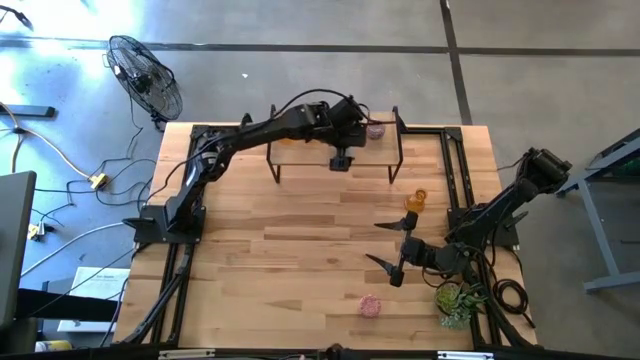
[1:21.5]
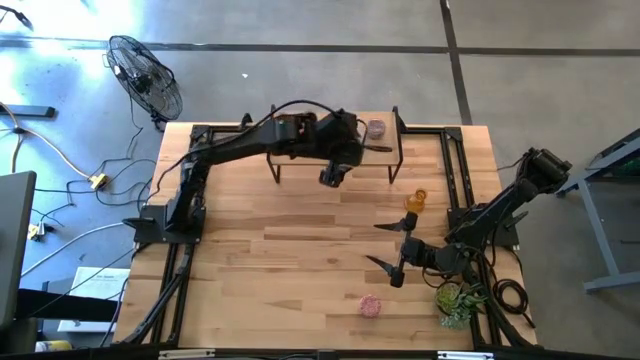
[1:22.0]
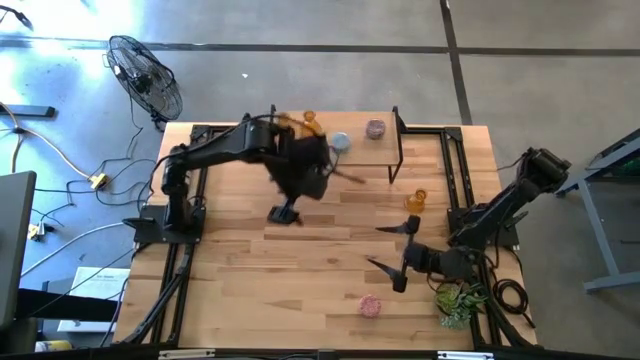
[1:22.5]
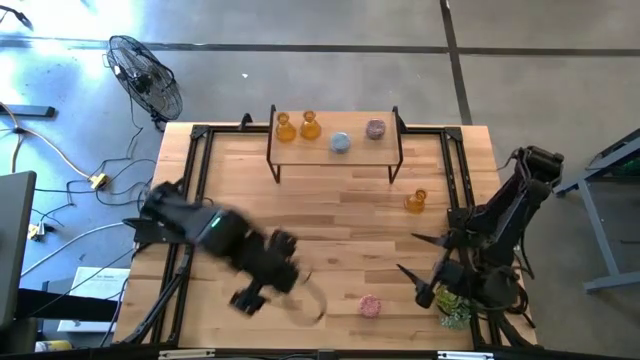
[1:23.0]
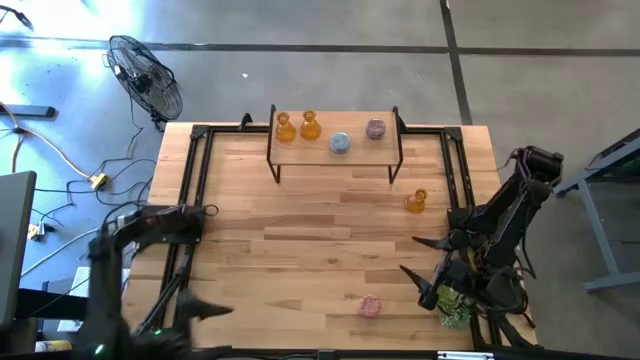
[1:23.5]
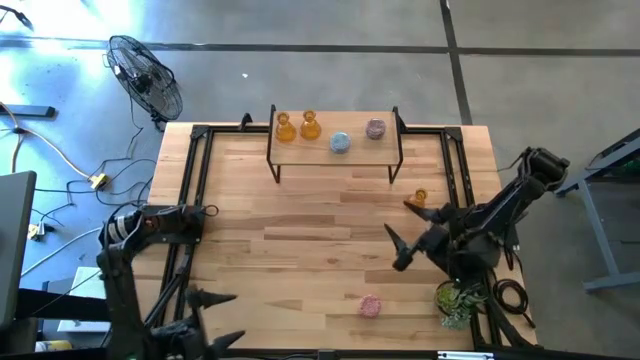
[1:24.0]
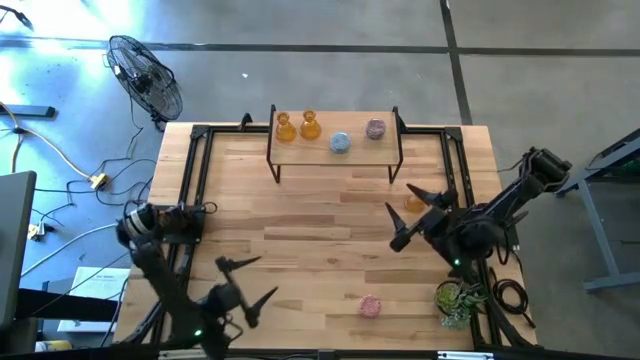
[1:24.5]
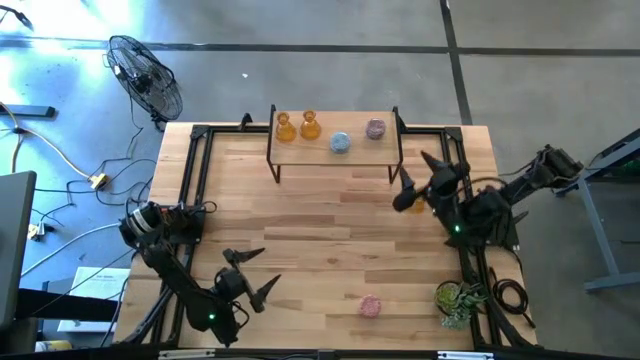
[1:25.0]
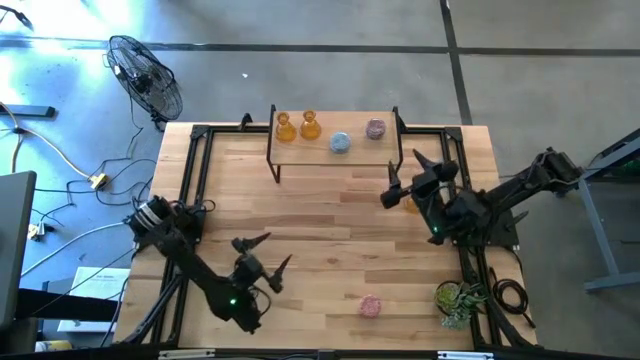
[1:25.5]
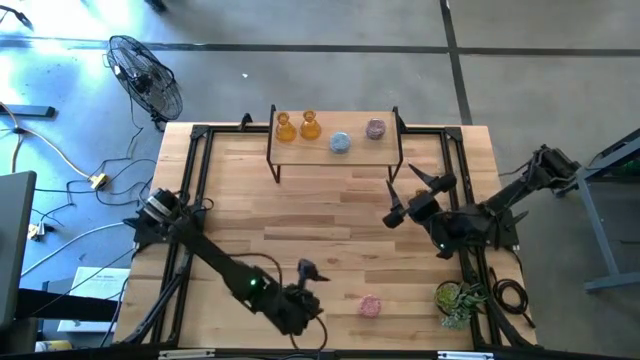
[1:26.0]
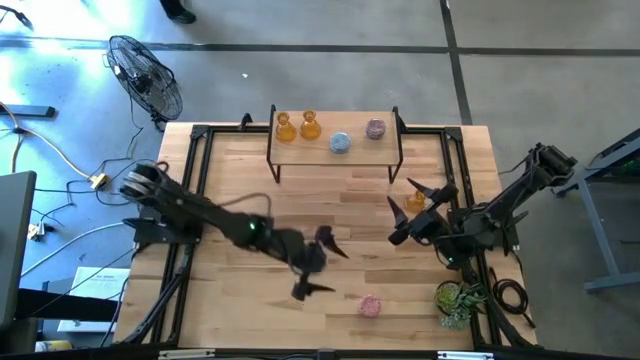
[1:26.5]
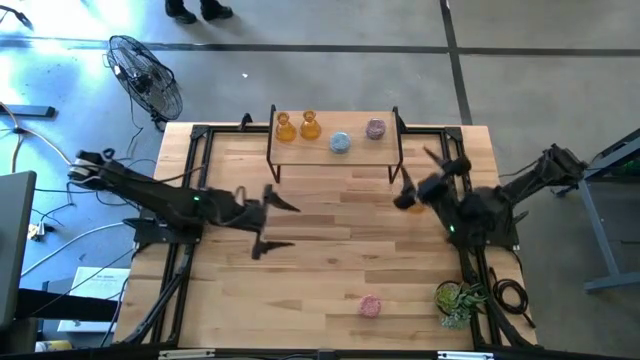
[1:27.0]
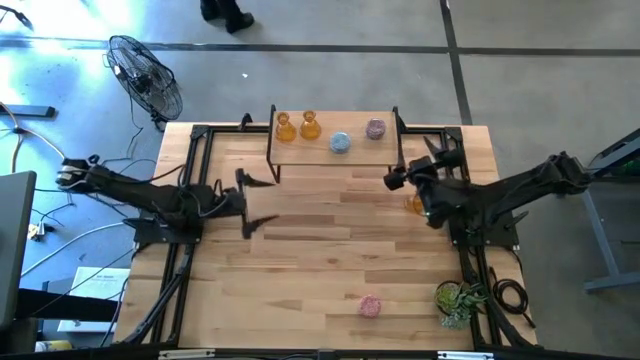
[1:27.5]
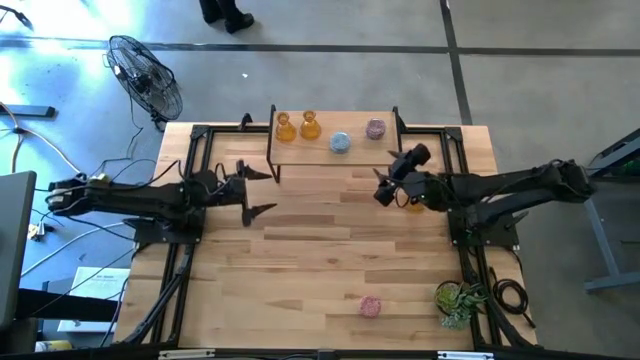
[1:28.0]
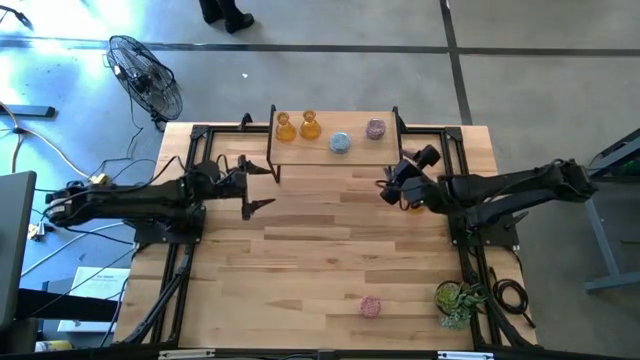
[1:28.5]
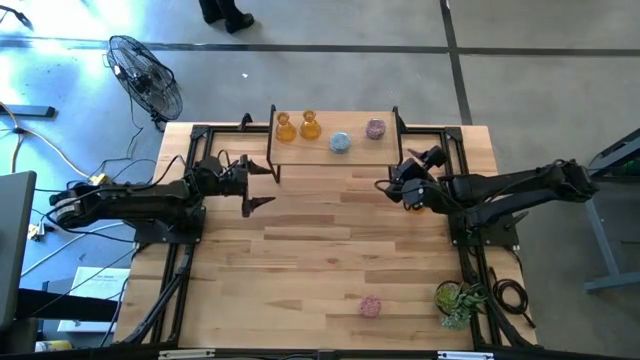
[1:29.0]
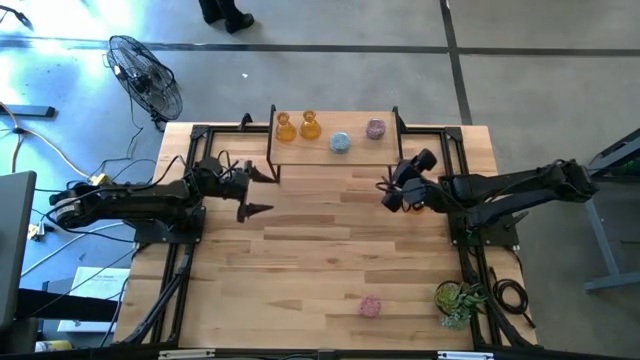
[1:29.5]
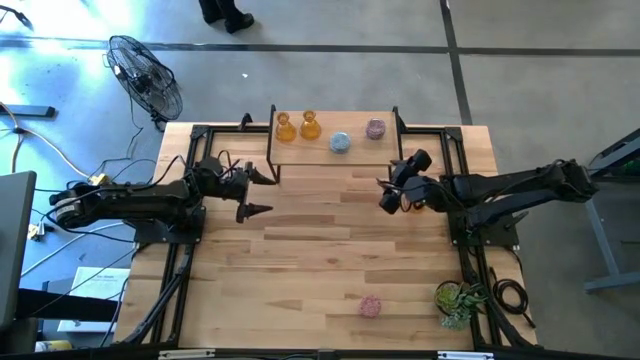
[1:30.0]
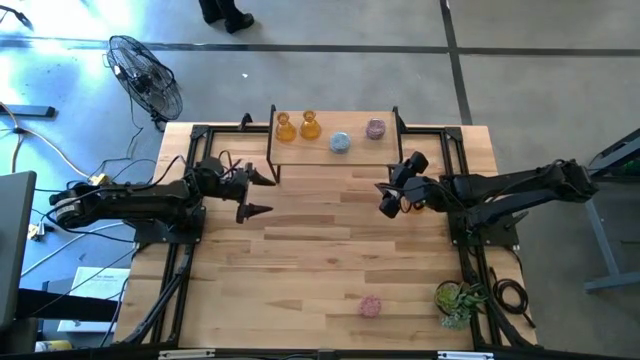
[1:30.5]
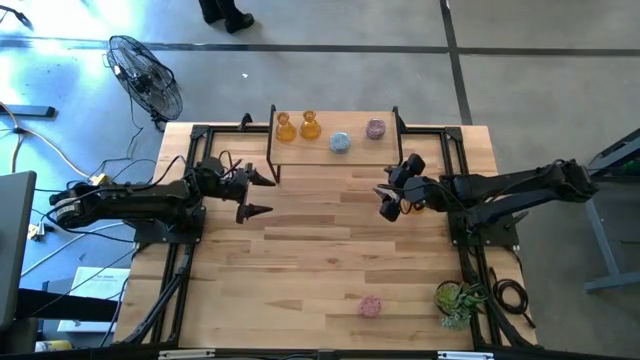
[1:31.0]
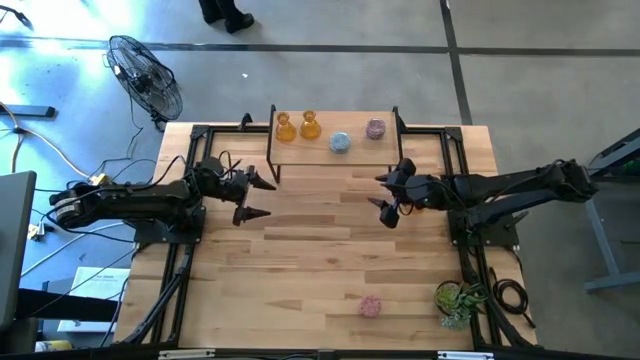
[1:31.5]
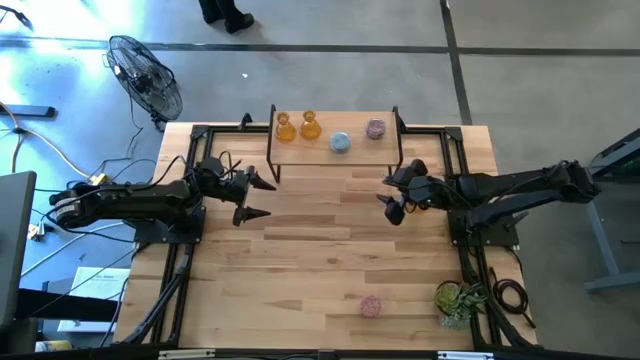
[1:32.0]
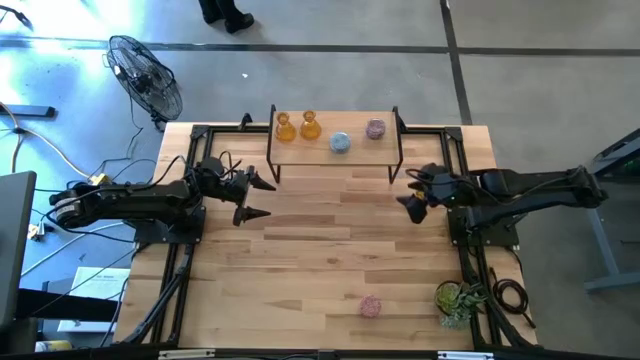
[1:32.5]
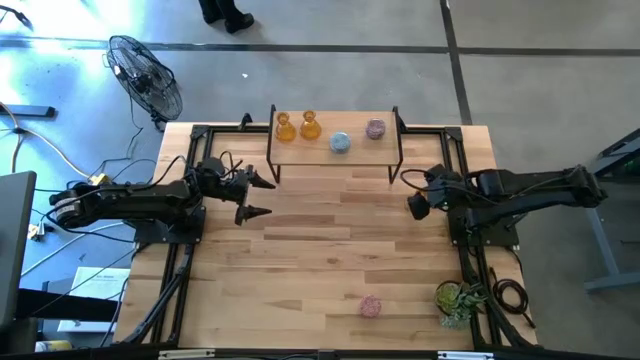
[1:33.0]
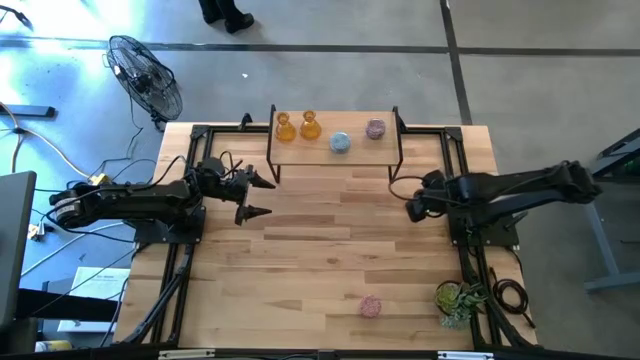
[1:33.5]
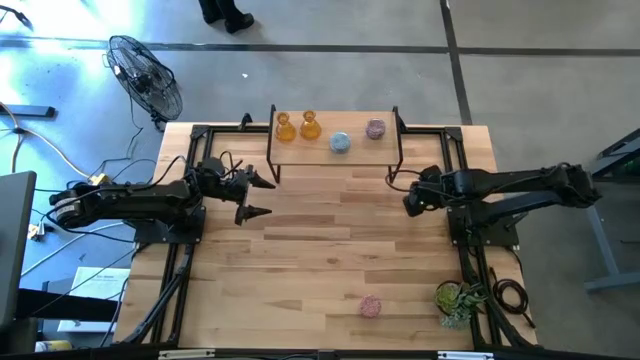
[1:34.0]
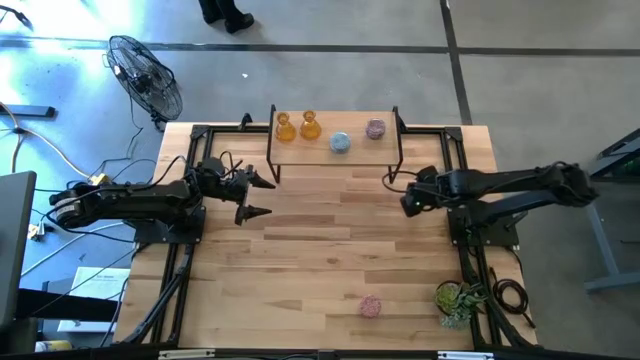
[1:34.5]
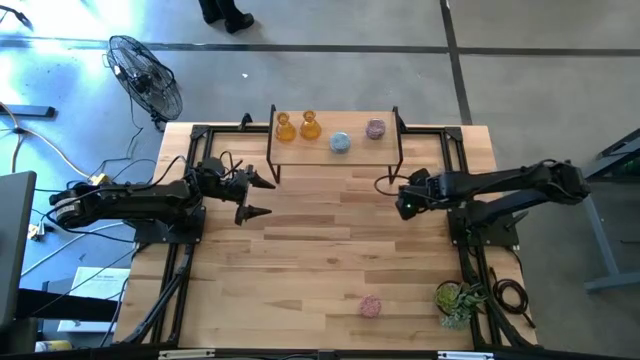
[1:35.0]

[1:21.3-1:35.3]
Task: Pick & Place candle stick holders
Put the orange candle holder on the shelf

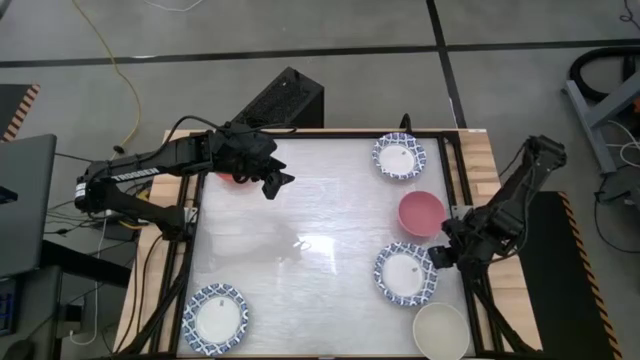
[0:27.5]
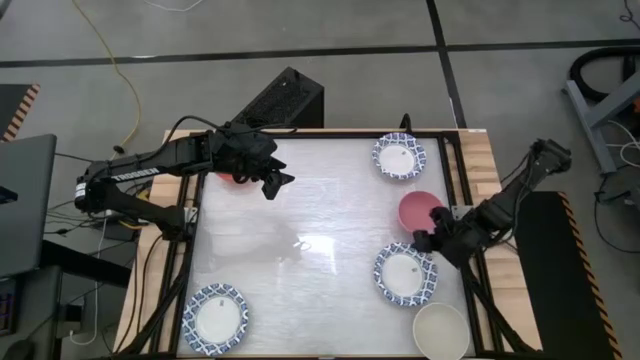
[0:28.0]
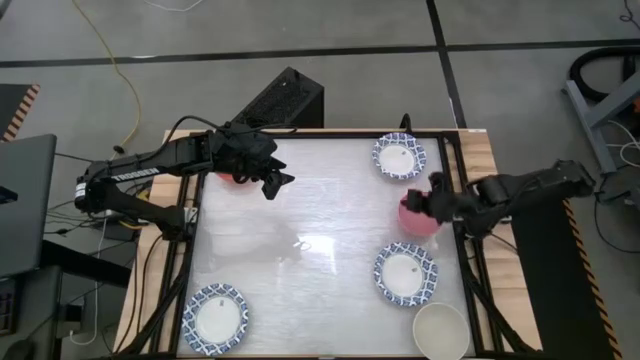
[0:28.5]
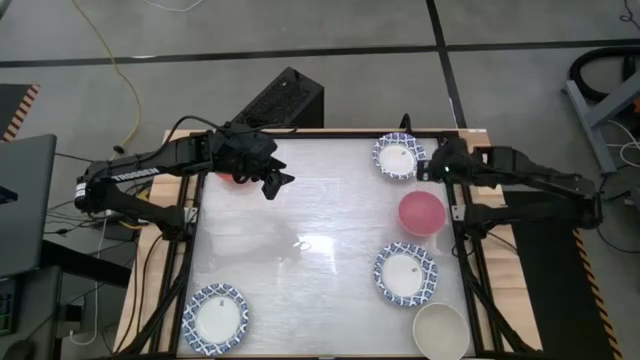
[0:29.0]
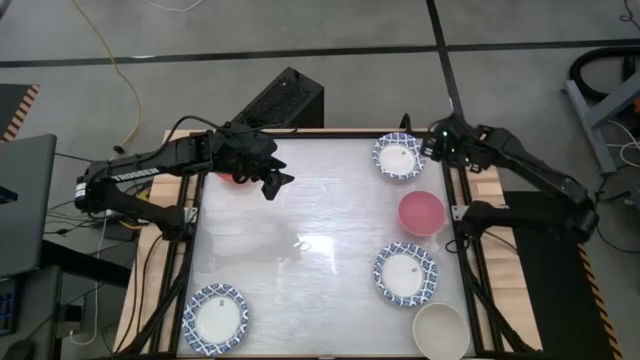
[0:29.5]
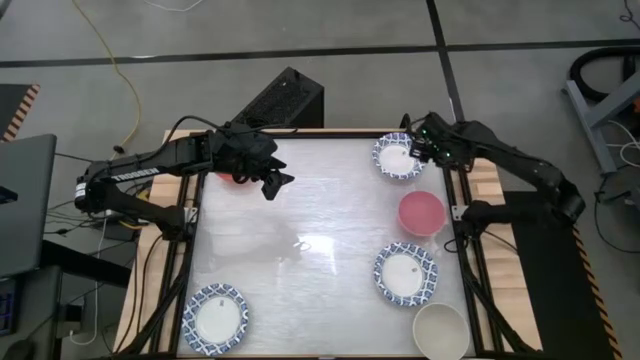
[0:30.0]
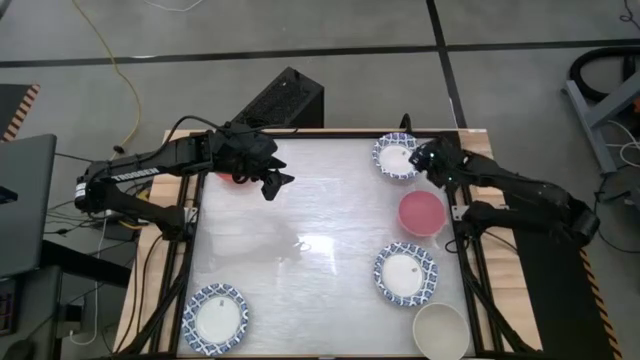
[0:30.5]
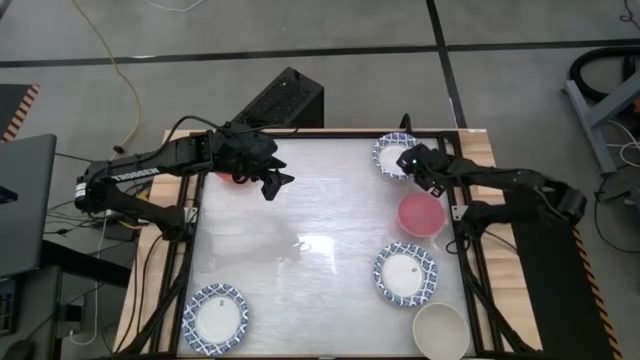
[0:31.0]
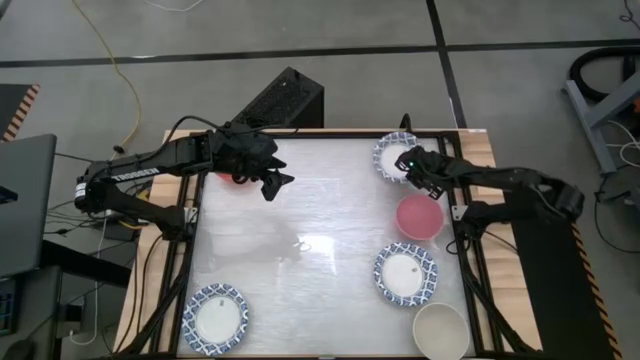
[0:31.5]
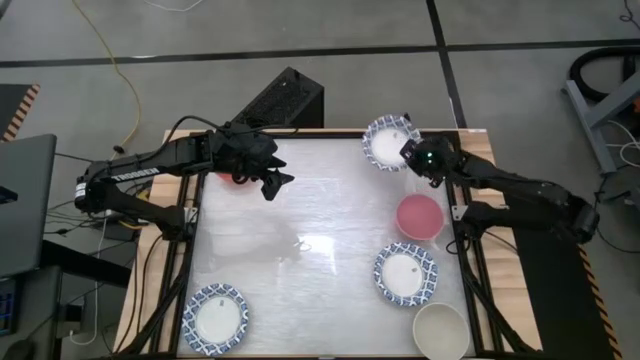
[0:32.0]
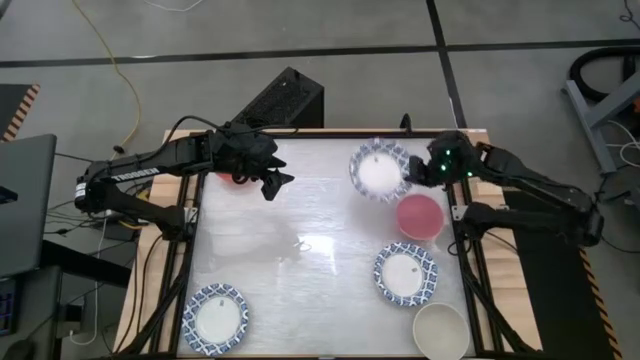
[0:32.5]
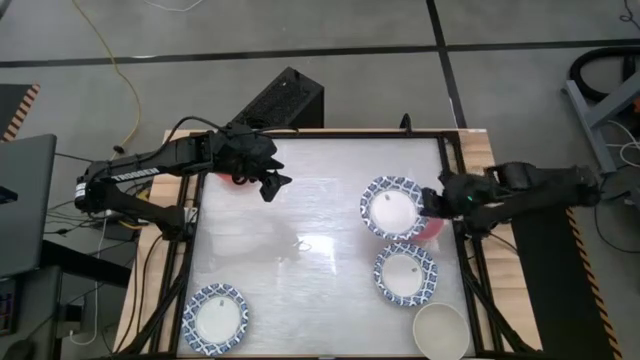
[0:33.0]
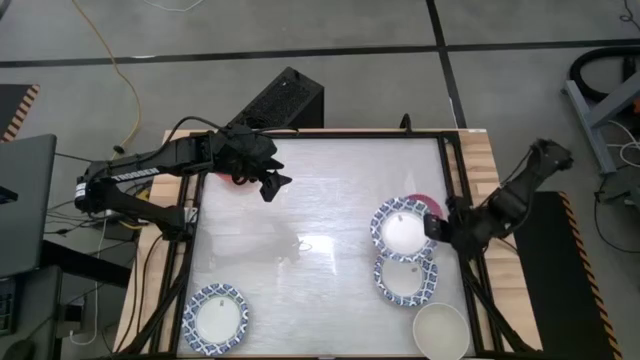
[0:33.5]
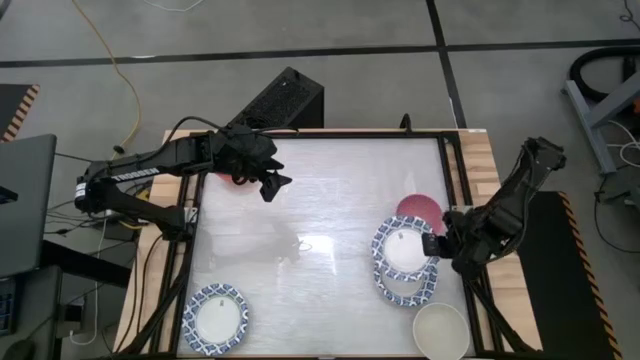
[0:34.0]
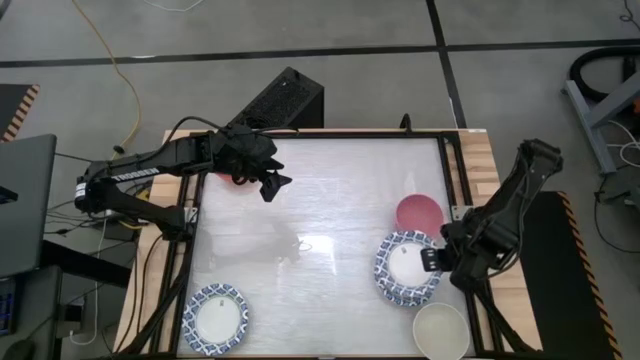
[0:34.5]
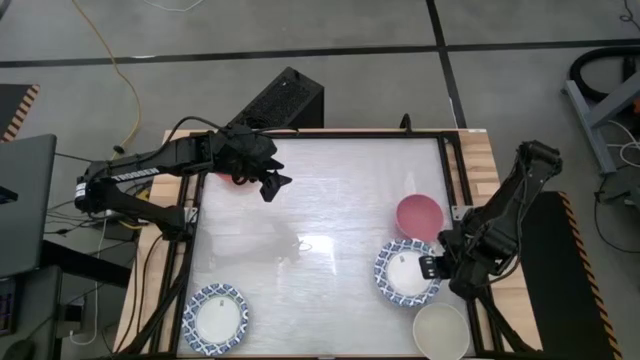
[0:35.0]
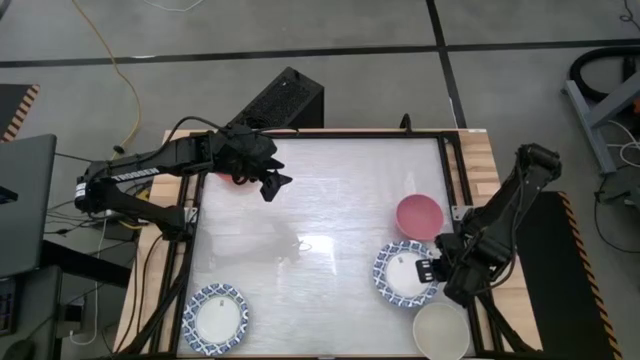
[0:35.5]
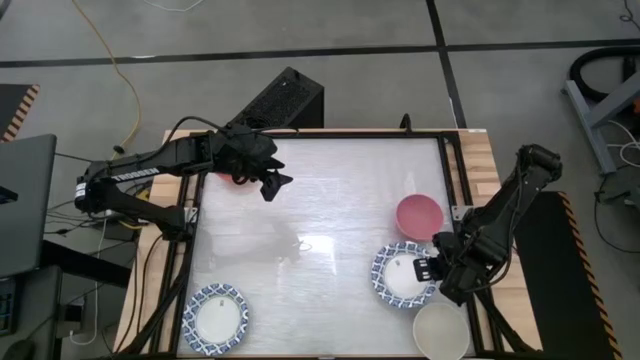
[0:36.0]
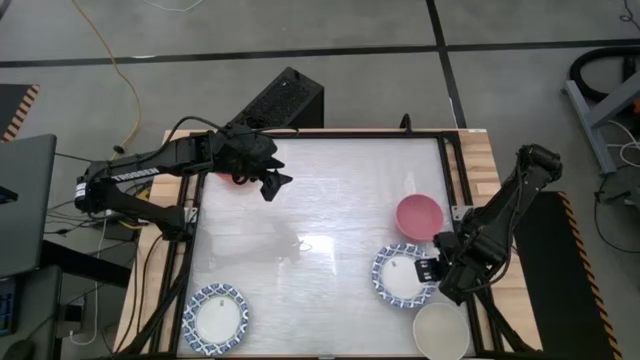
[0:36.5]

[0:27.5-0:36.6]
Task: Nest bowls inside each other by size order
Stack the top right blue bowl on top of the bottom right blue bowl
